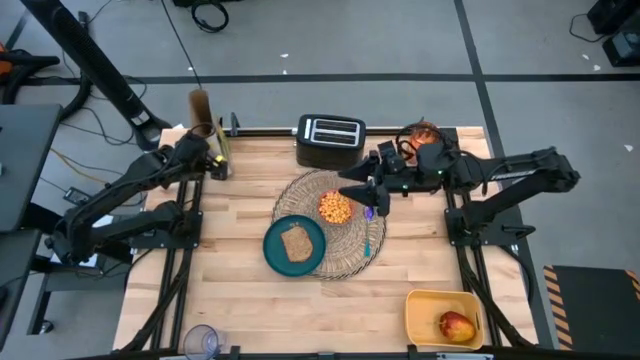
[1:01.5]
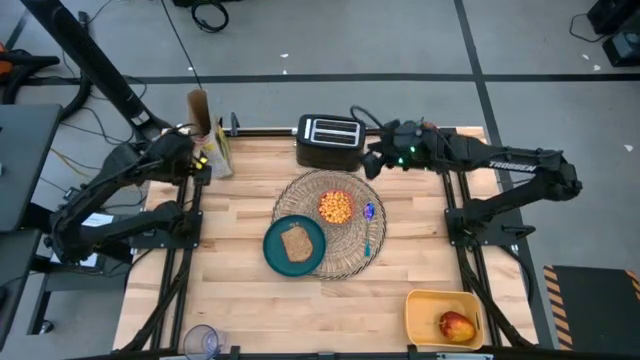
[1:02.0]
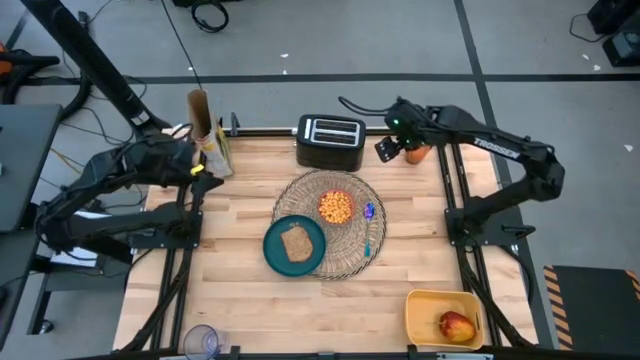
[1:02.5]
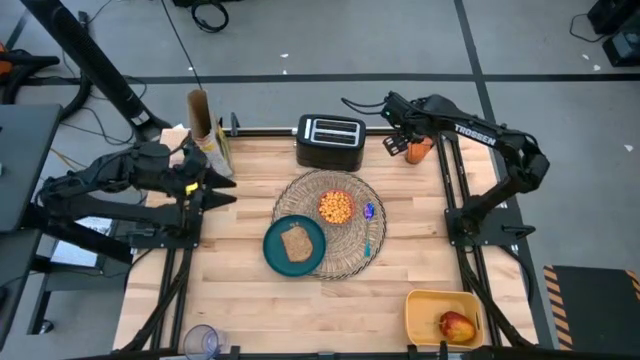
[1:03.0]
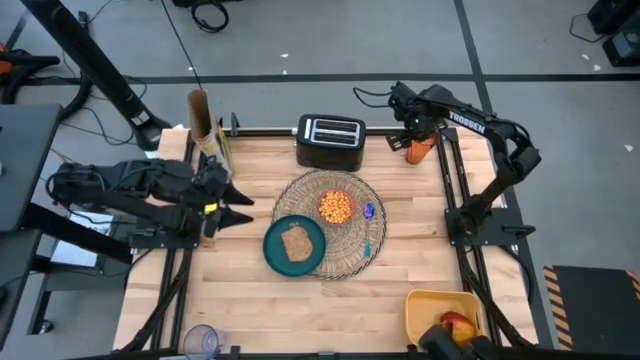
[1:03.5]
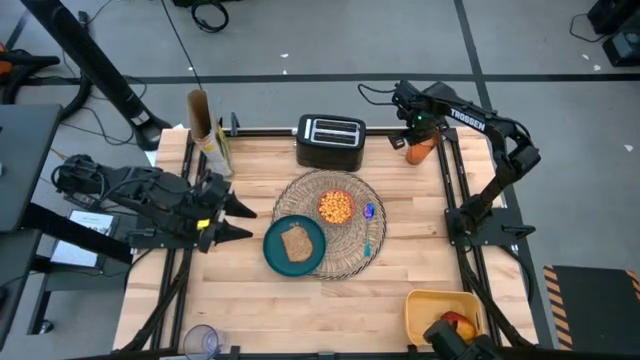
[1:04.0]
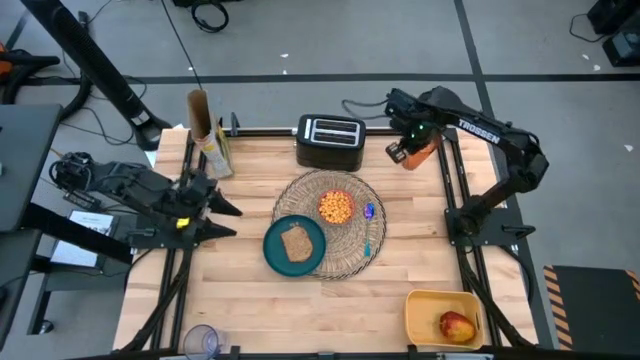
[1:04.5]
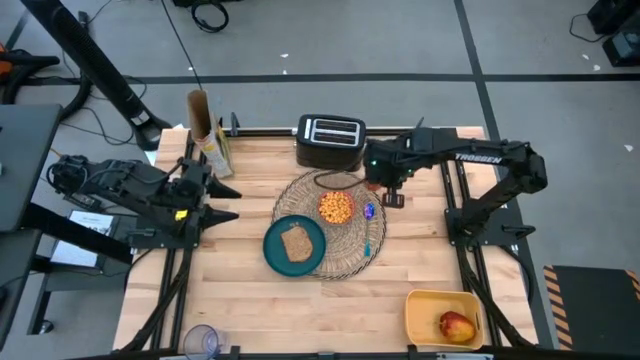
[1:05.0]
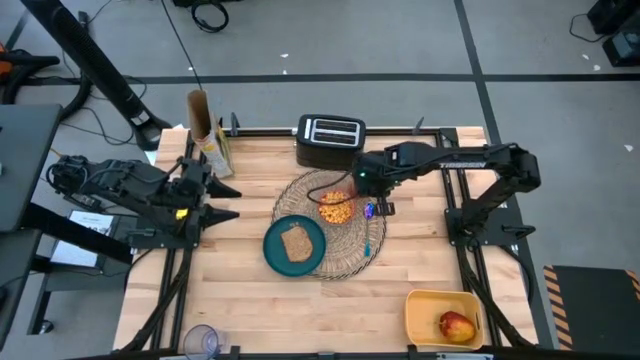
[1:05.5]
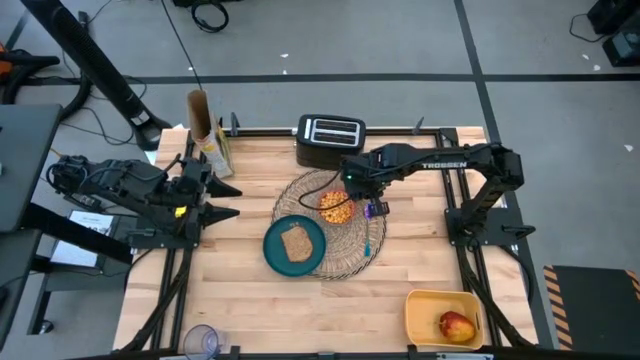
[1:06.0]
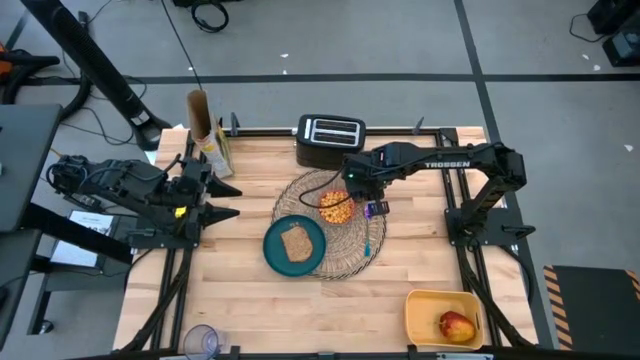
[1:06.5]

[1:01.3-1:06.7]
Task: Arrange a breakfast setting
Put the orange cup on the place mat

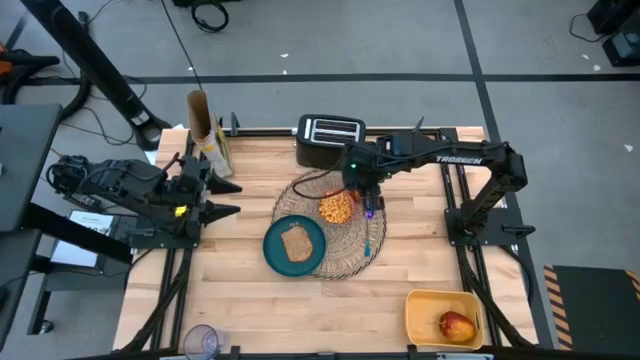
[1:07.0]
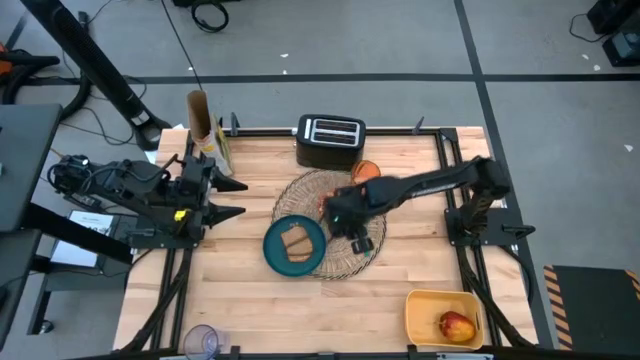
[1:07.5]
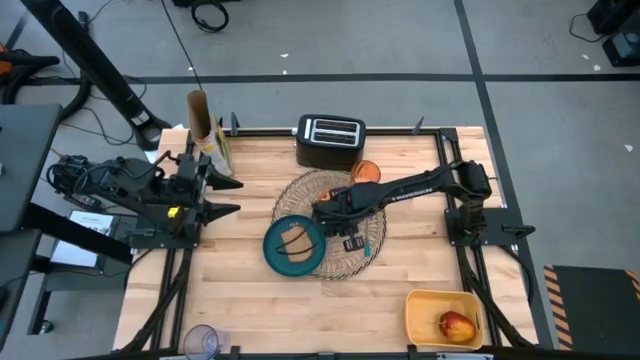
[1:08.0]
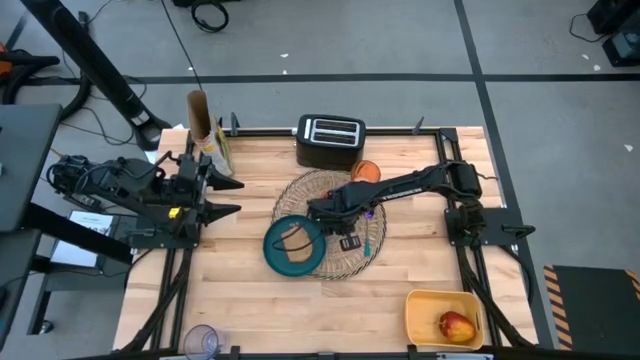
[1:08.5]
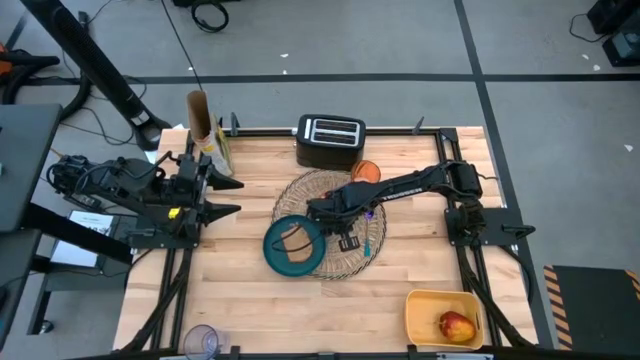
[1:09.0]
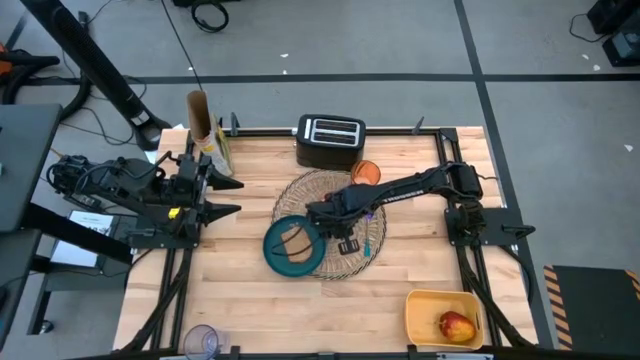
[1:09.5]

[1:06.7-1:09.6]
Adjust the red bowl

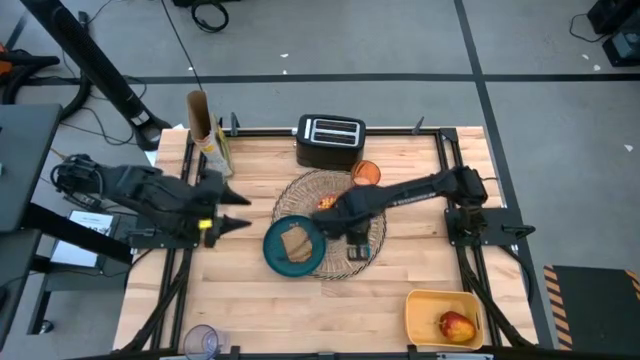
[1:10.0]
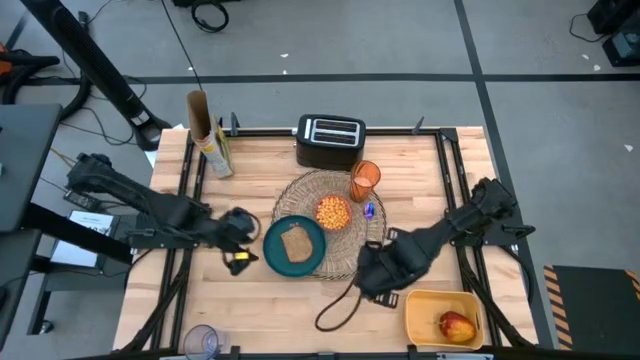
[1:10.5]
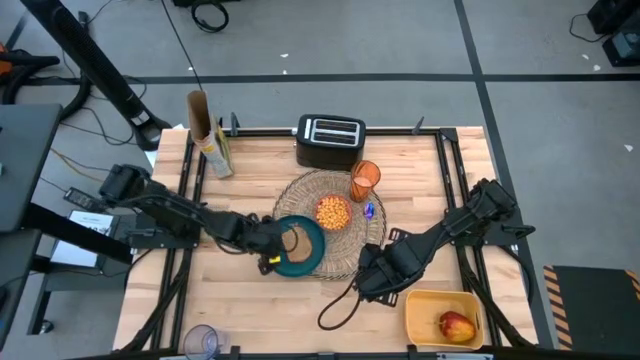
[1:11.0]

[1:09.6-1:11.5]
Adjust the blue plate

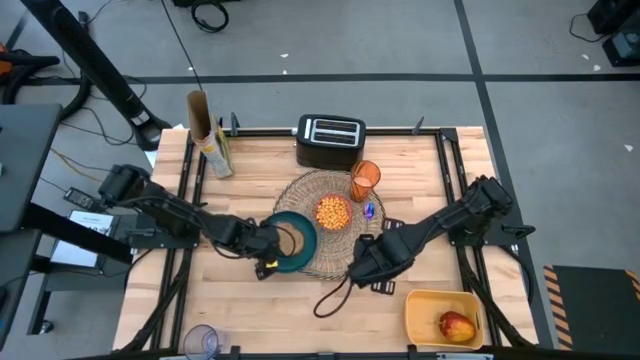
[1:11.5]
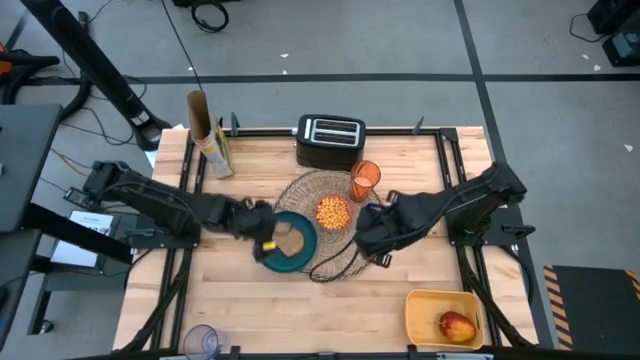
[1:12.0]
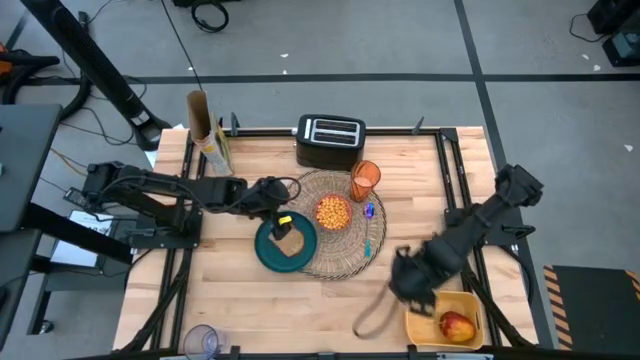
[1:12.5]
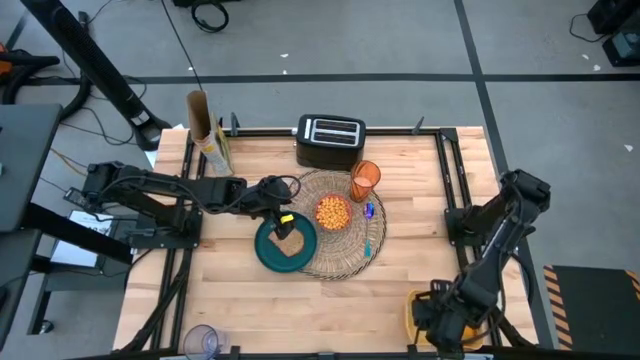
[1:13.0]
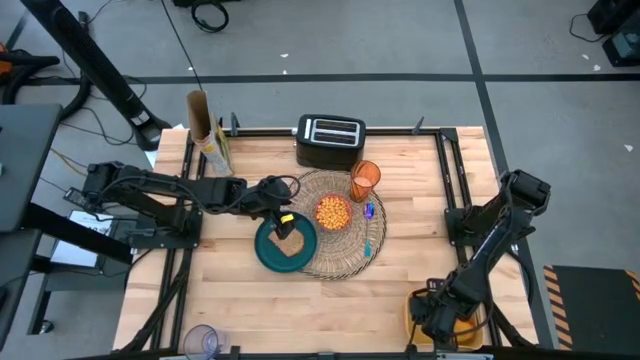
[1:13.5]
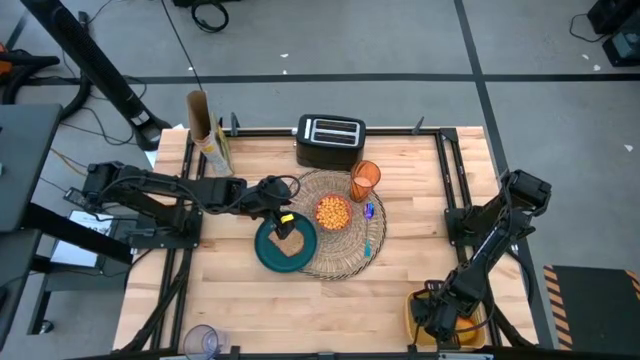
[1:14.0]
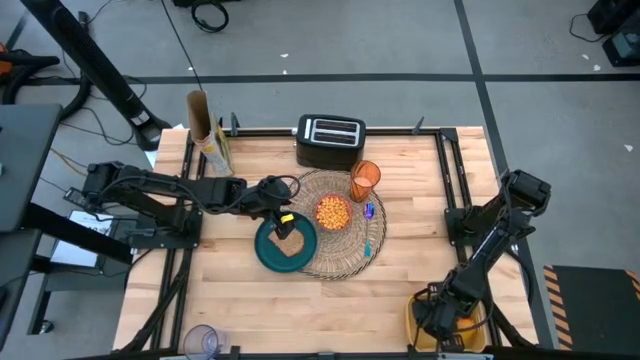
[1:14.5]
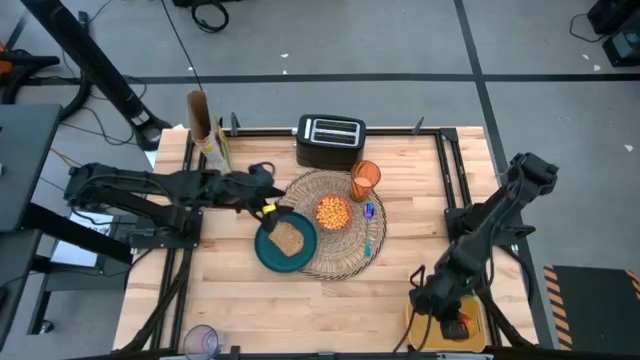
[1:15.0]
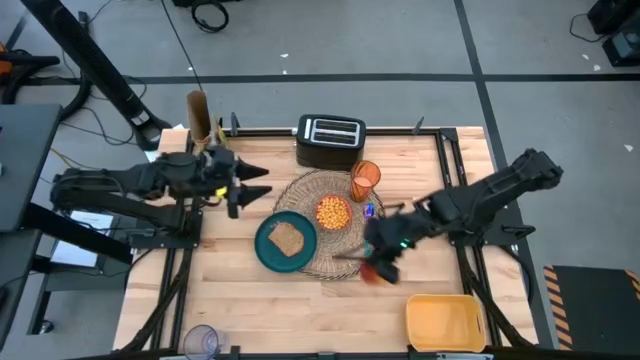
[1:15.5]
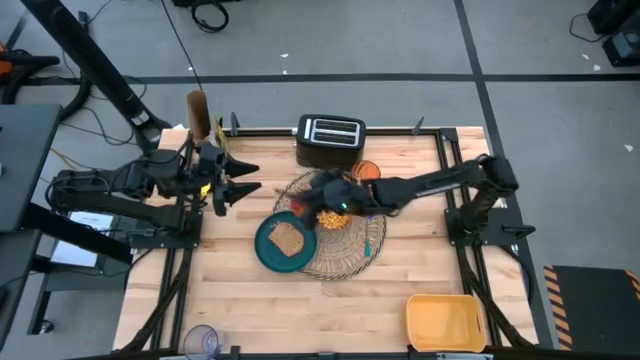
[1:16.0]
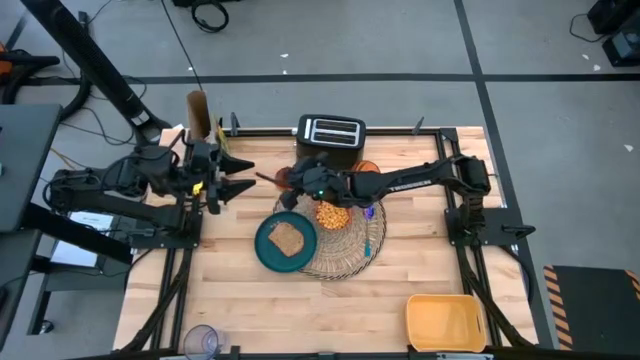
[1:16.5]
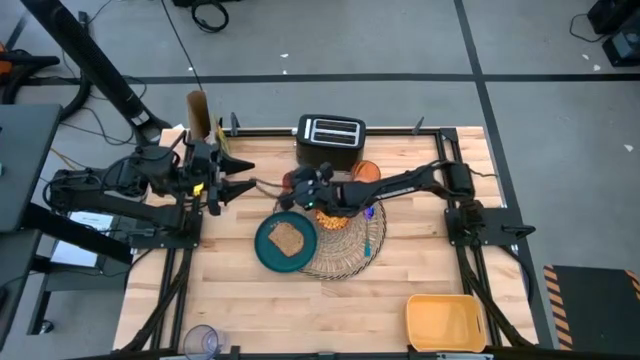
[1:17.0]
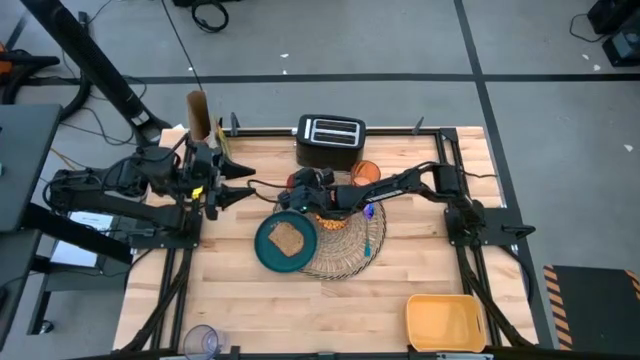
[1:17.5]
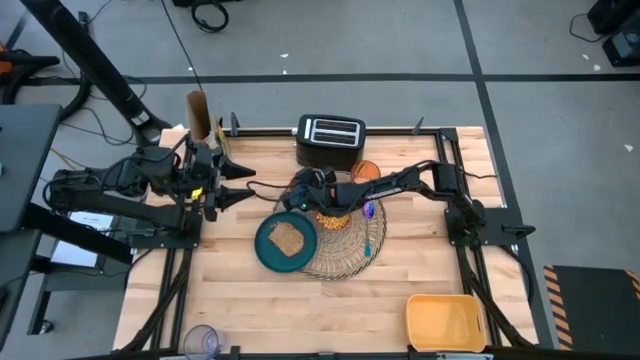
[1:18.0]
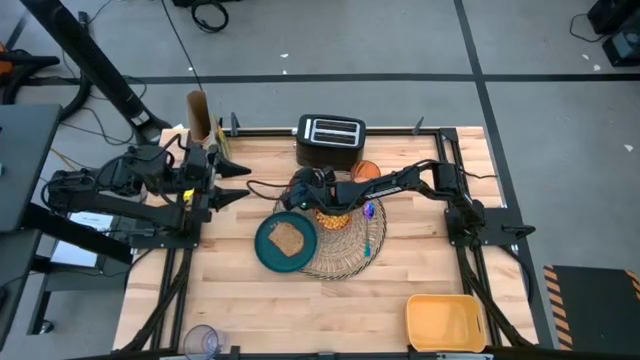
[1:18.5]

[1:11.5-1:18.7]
Put the apple on the place mat

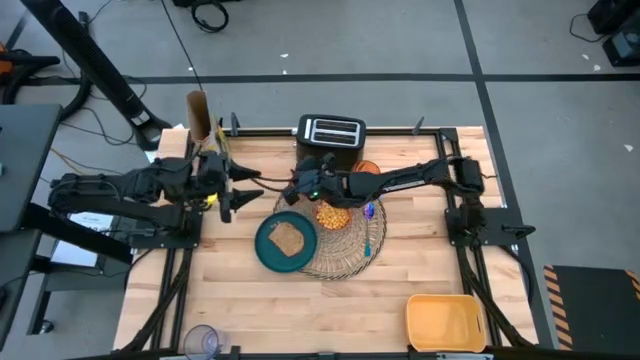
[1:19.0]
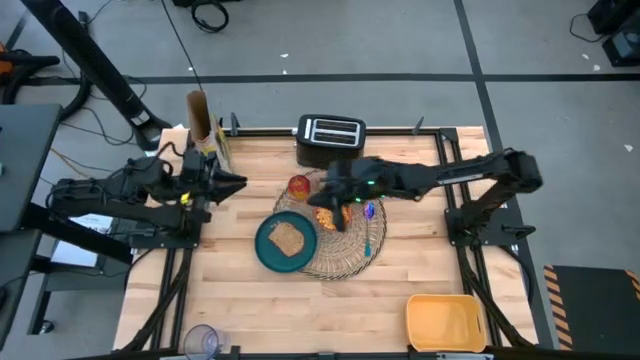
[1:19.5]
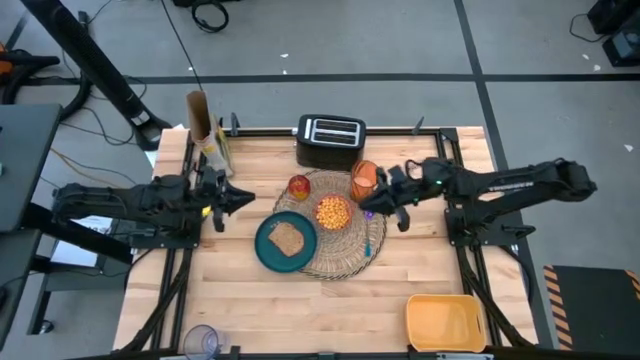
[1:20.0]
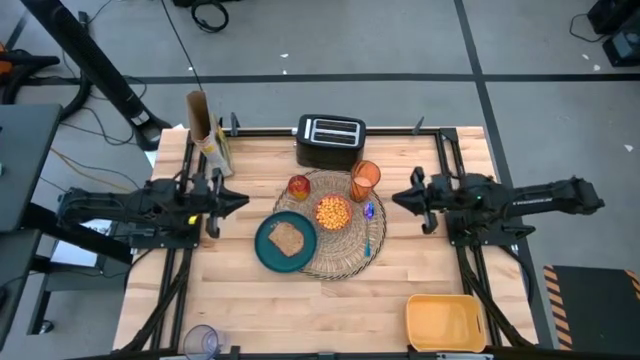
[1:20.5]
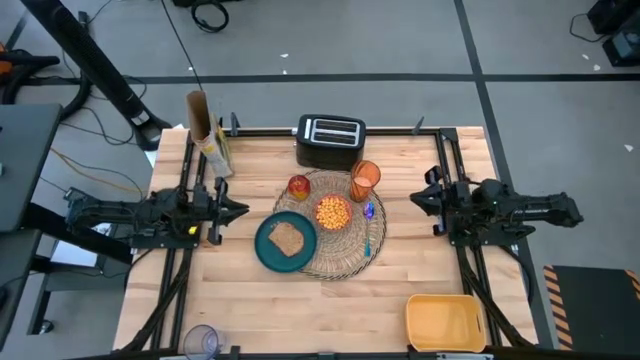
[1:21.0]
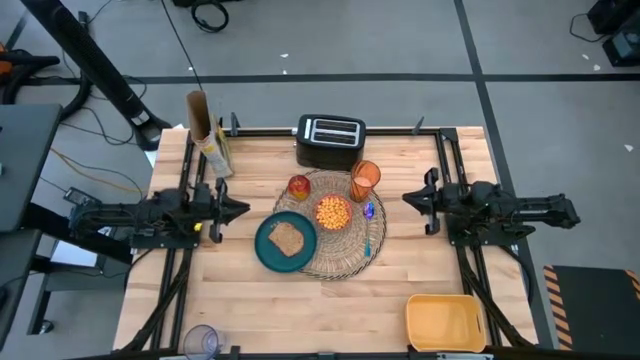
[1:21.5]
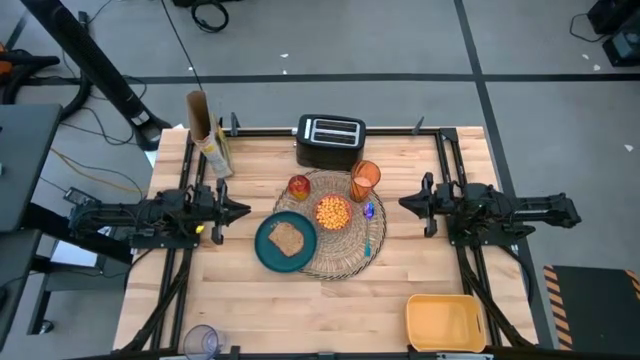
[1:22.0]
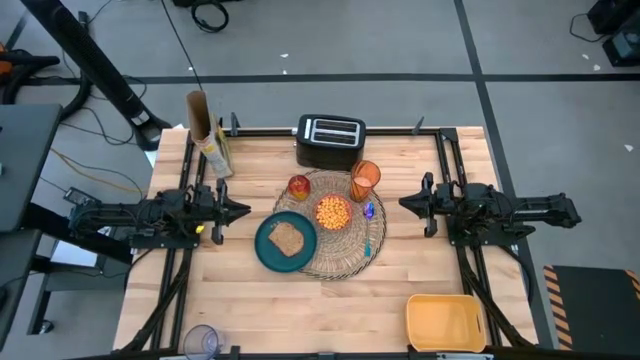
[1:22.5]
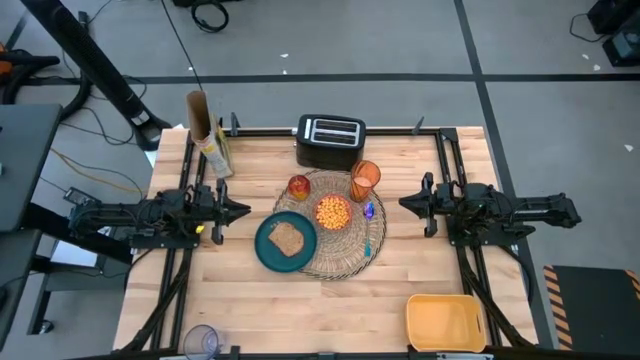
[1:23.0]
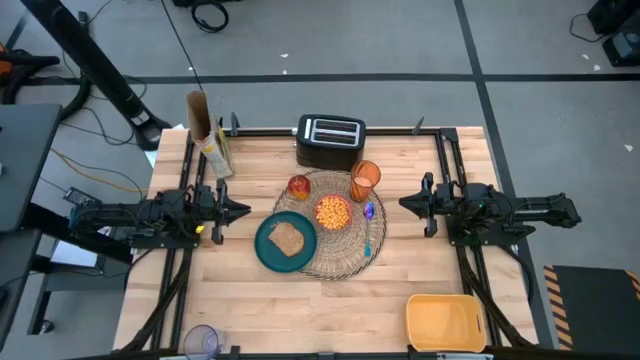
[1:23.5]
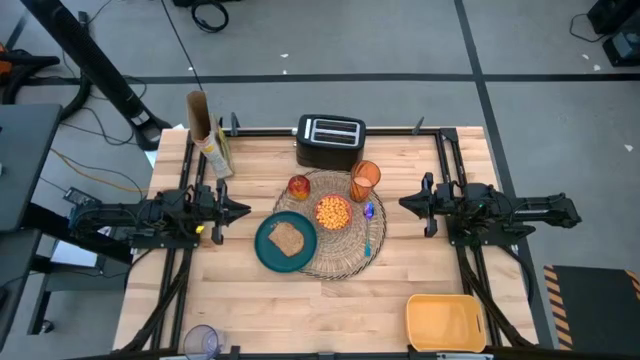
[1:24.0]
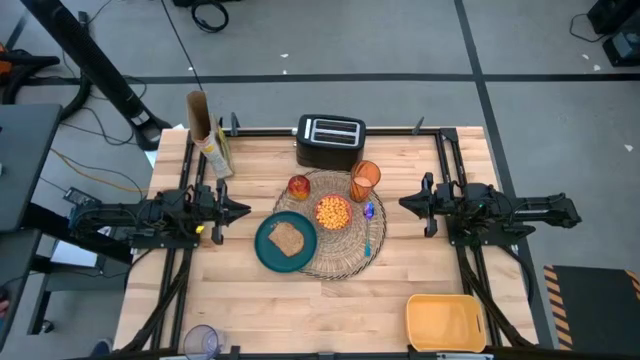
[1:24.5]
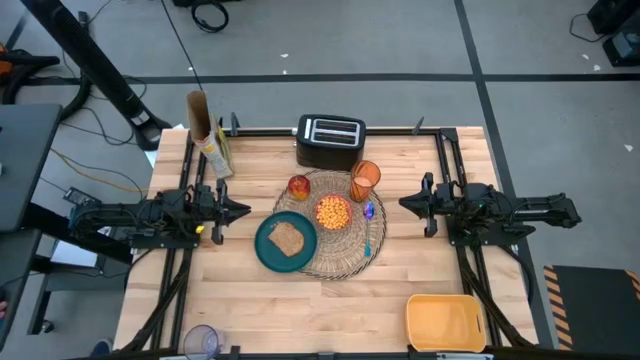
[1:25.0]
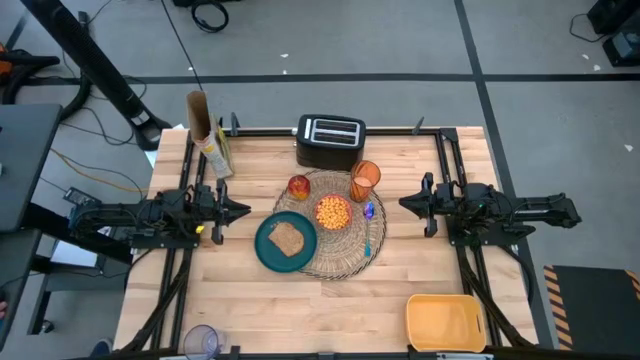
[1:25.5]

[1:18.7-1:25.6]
Return to Home Position
